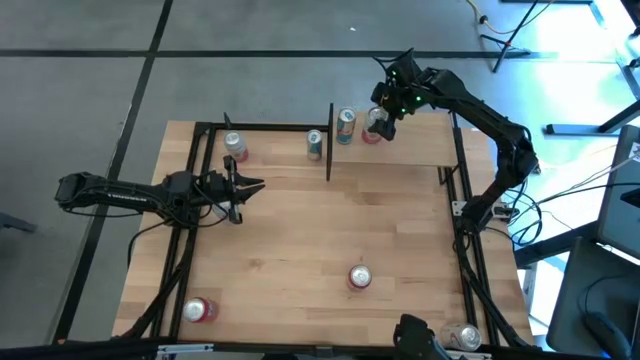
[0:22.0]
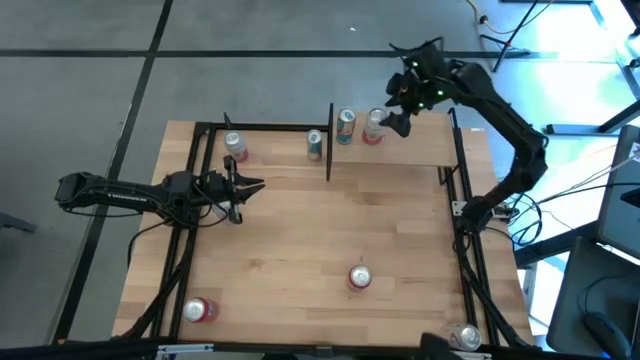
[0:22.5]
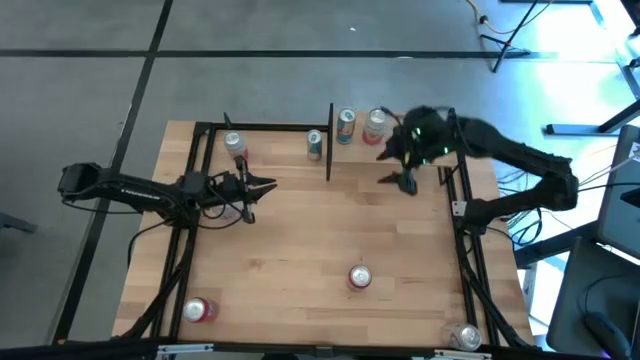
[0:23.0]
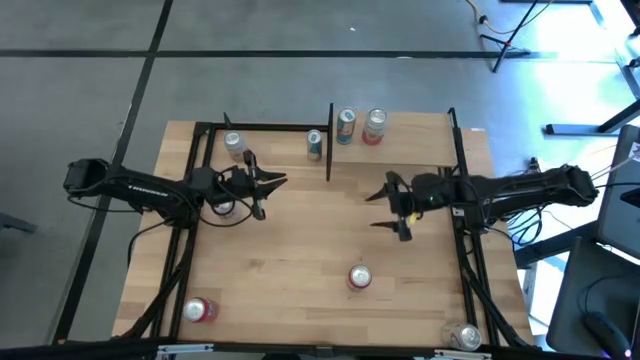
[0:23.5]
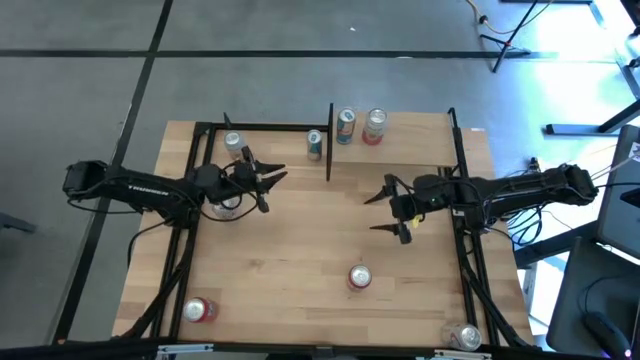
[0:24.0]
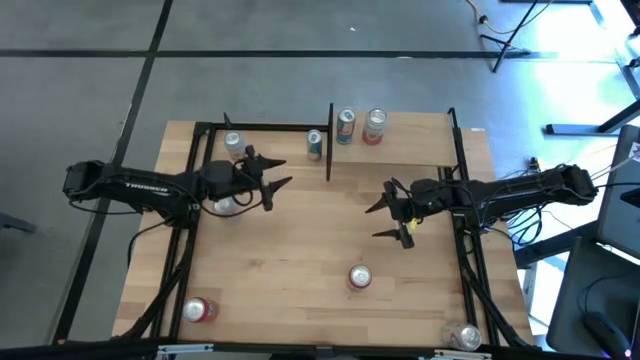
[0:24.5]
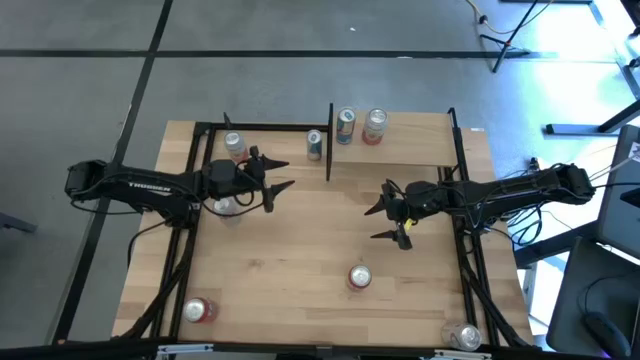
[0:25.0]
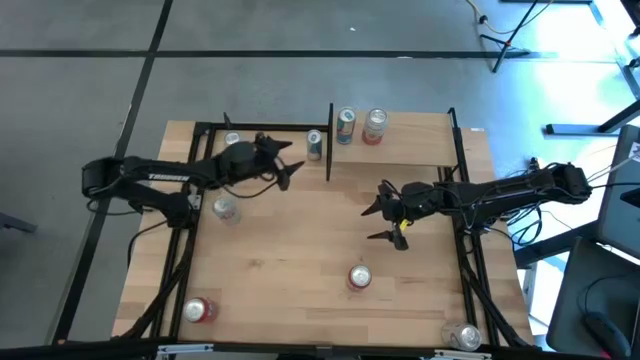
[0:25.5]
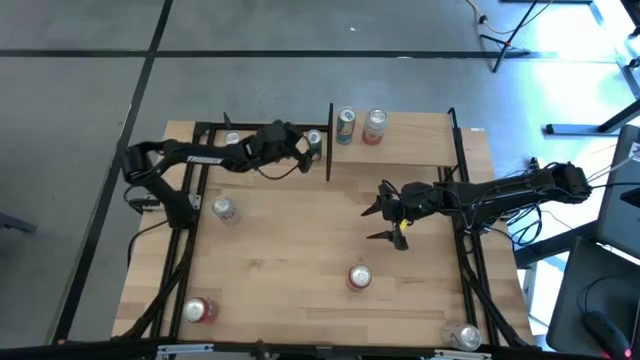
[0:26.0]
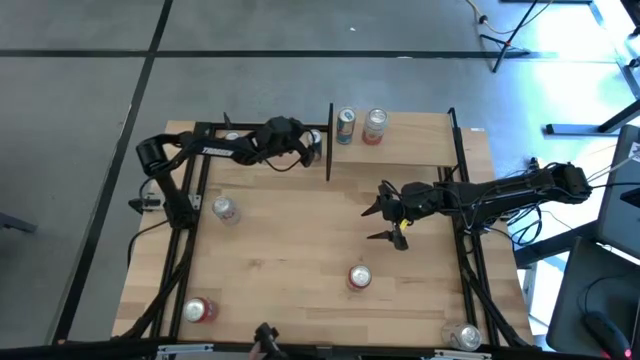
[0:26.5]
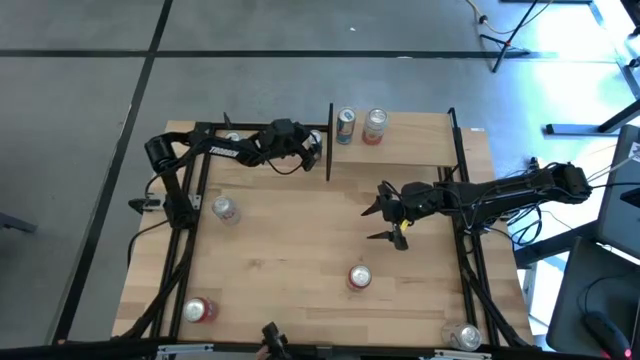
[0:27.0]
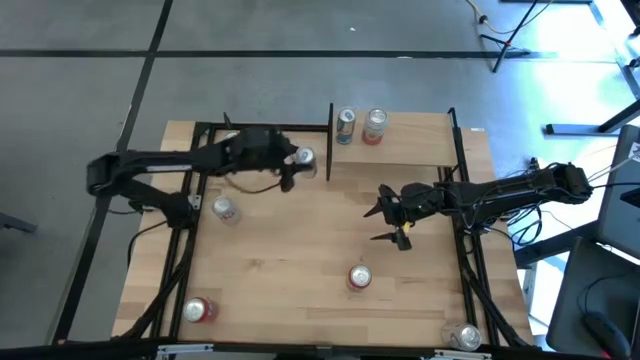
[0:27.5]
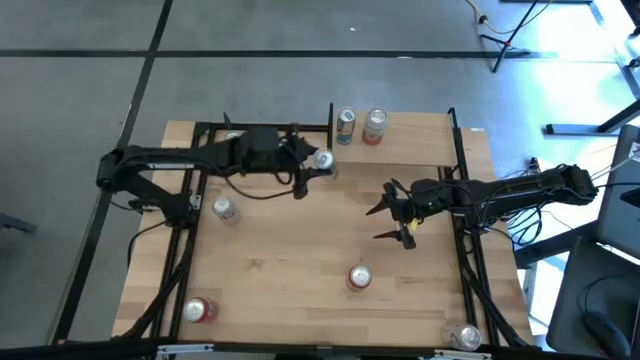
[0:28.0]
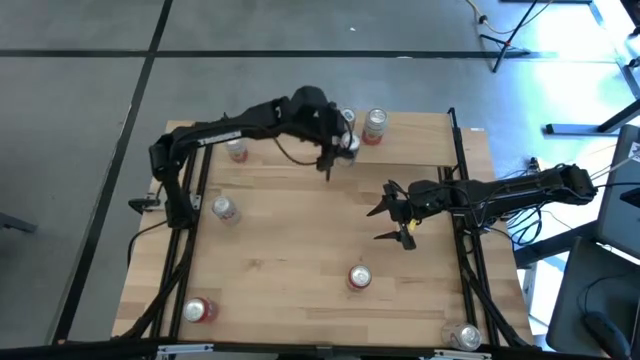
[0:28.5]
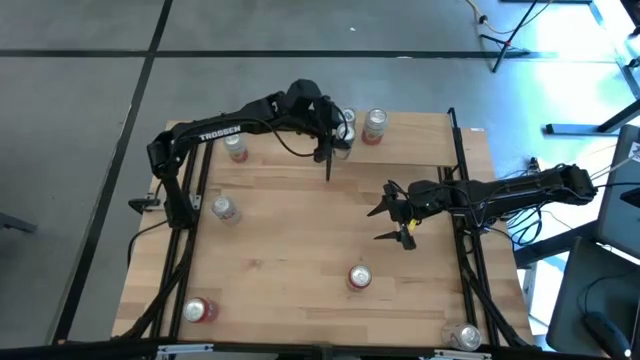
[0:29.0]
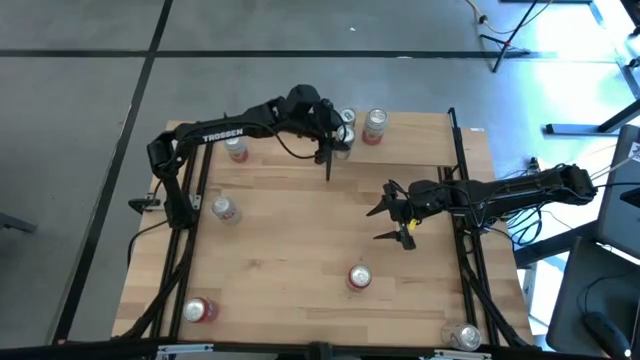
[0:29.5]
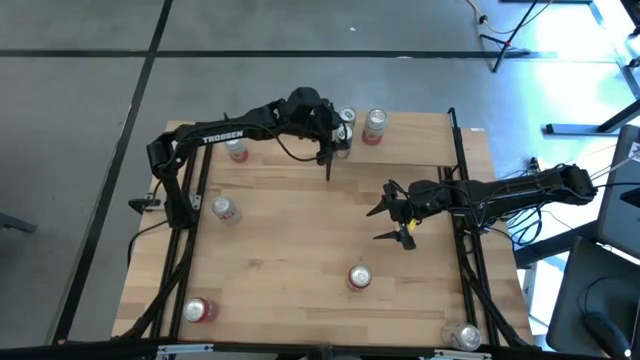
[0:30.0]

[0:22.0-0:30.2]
Task: Place canned beverage on shelf
Put the blue soda can and align with other blue can on the shelf

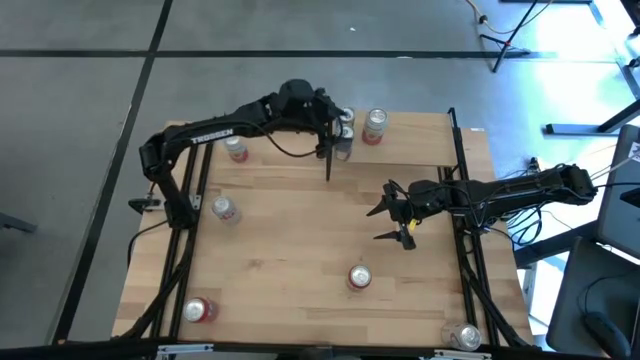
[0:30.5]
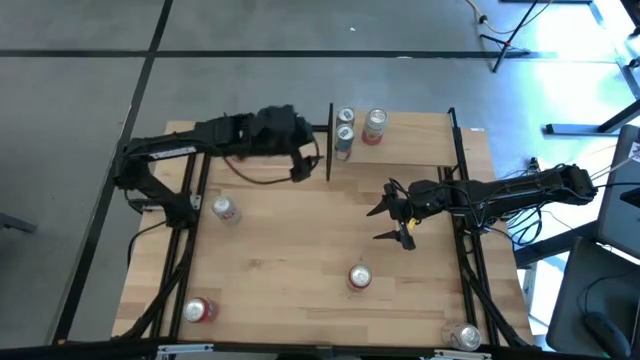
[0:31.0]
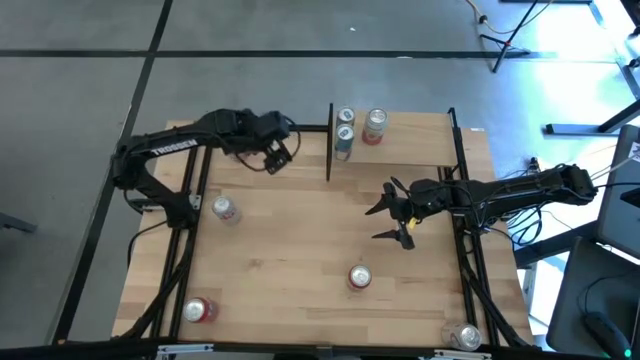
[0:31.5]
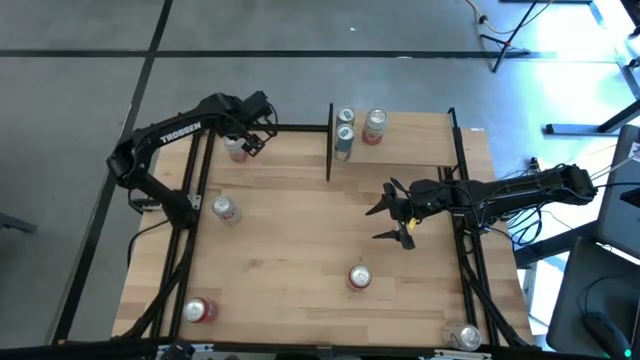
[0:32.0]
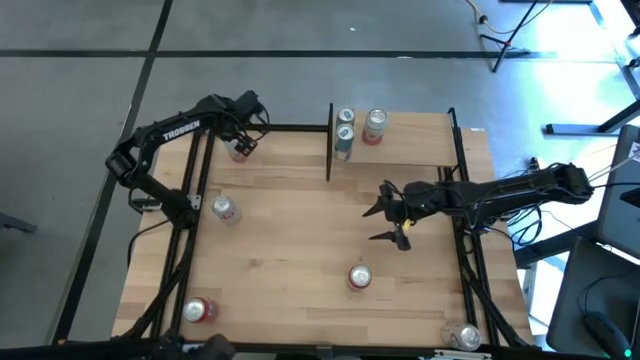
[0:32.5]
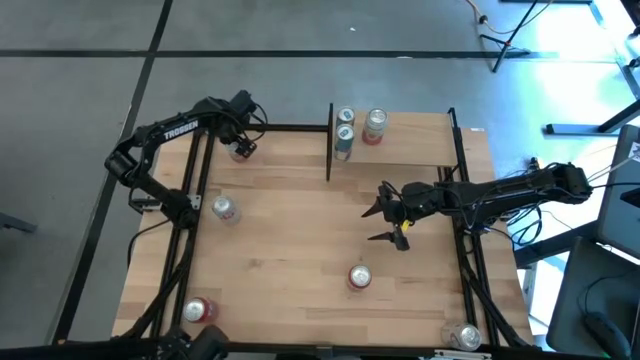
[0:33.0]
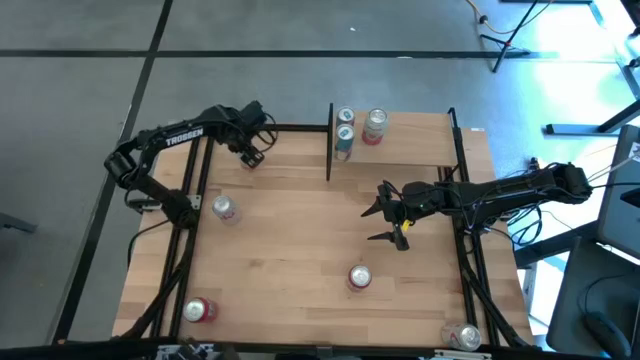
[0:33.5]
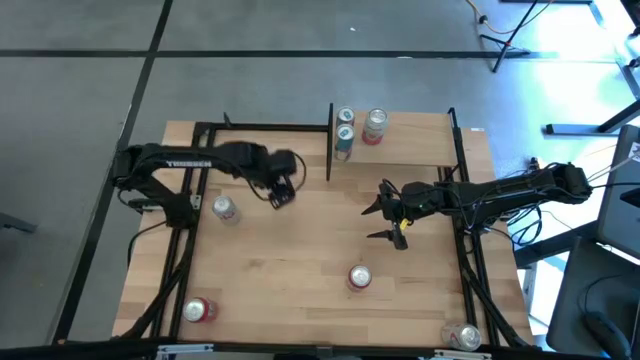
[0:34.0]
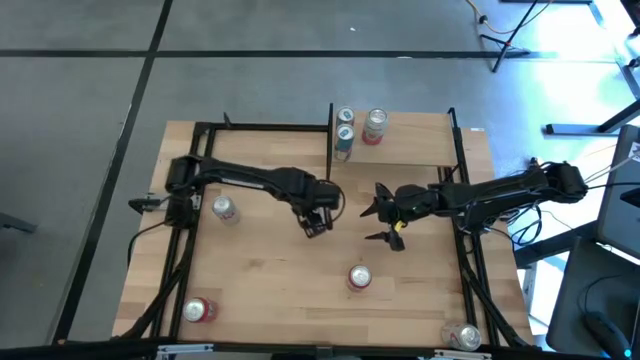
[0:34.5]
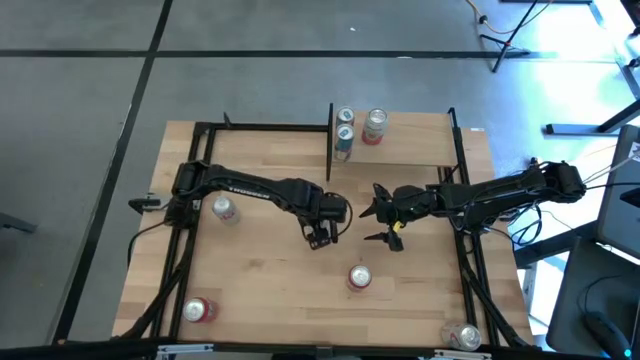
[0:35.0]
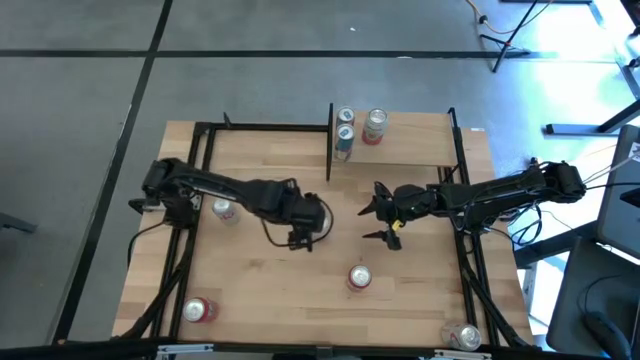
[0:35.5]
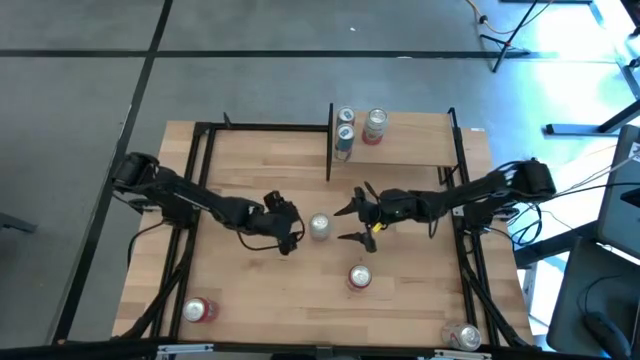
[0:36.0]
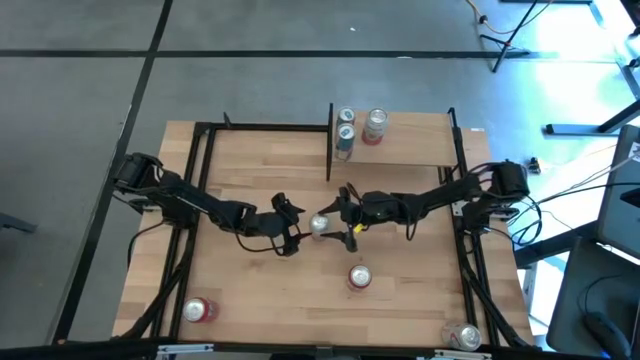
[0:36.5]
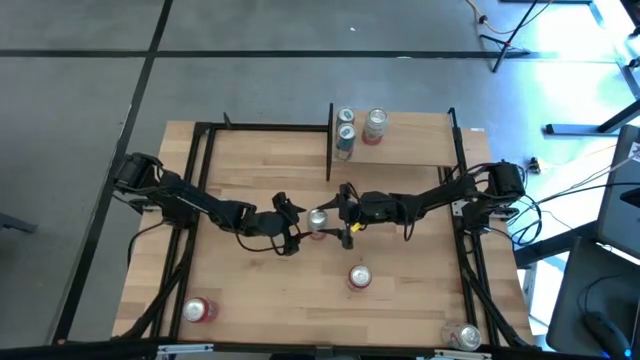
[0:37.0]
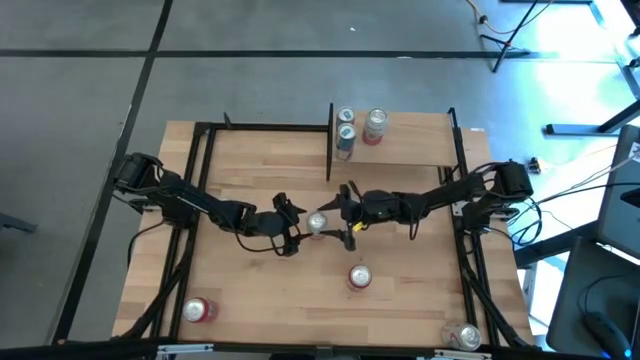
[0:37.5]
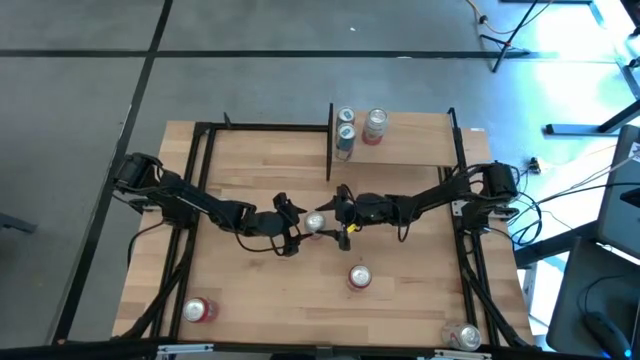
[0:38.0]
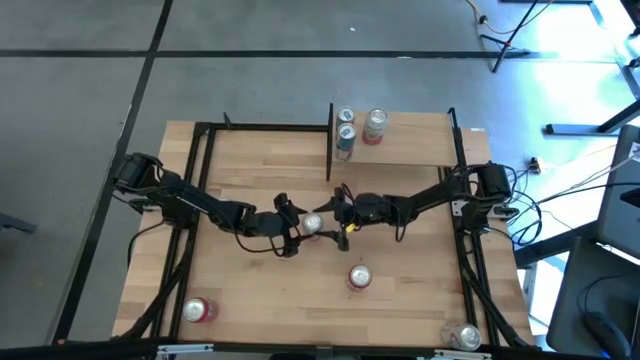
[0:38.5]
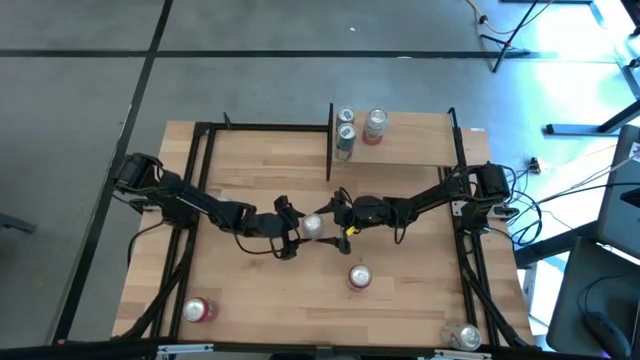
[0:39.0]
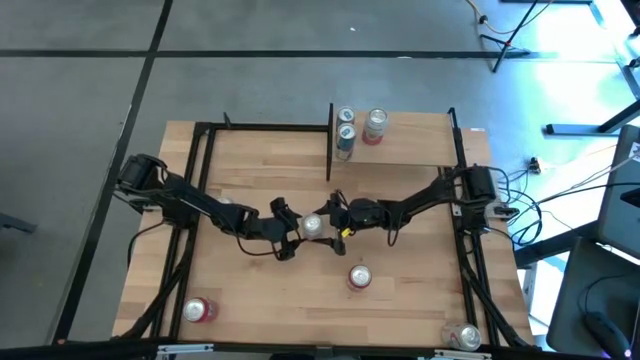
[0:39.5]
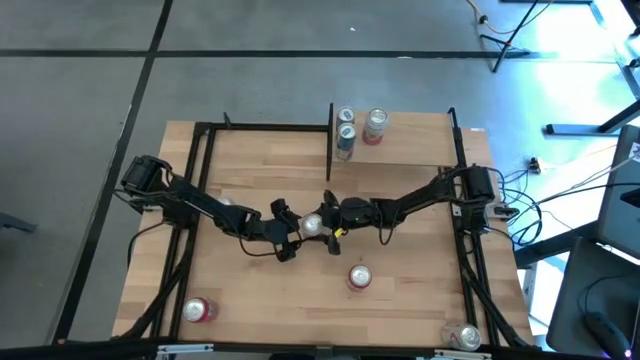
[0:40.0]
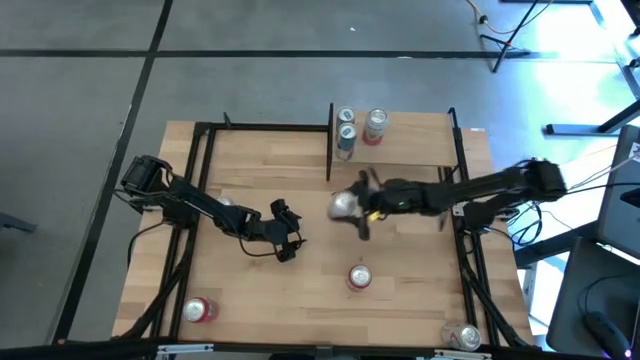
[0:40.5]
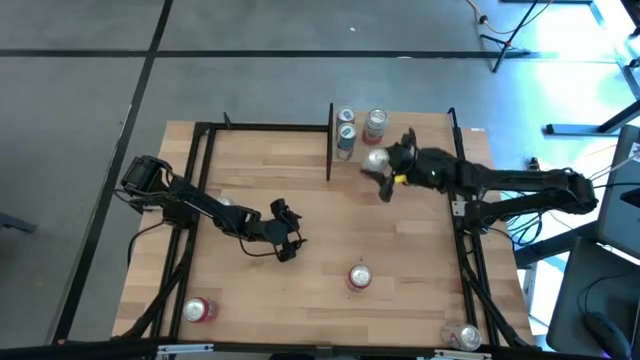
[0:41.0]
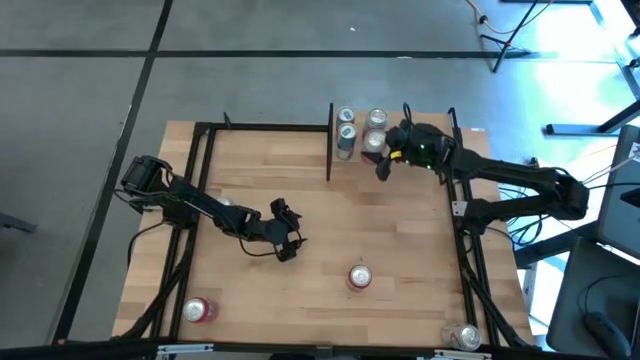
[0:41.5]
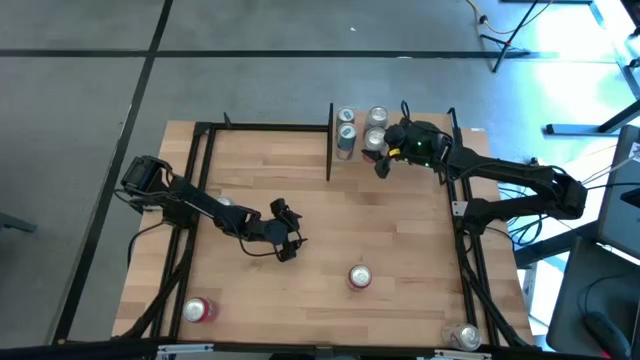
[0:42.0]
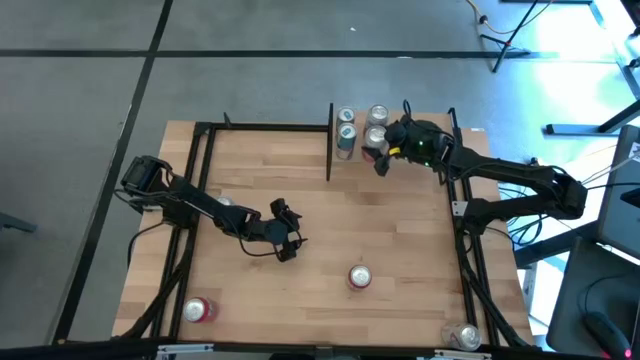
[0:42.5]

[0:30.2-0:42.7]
Put the white pink soda can and align with other white pink can on the shelf
